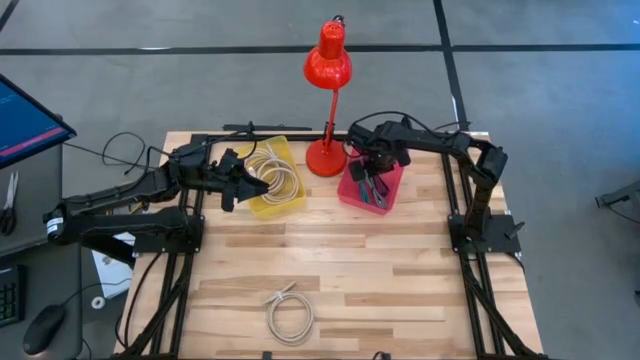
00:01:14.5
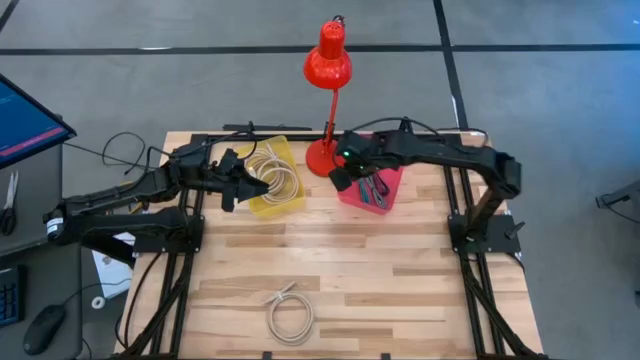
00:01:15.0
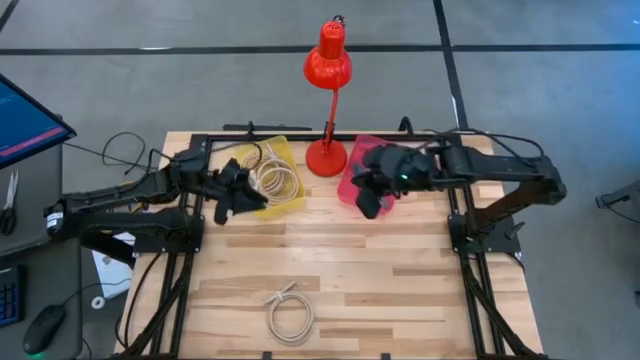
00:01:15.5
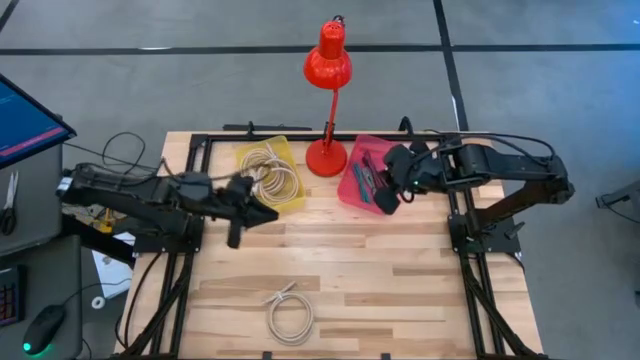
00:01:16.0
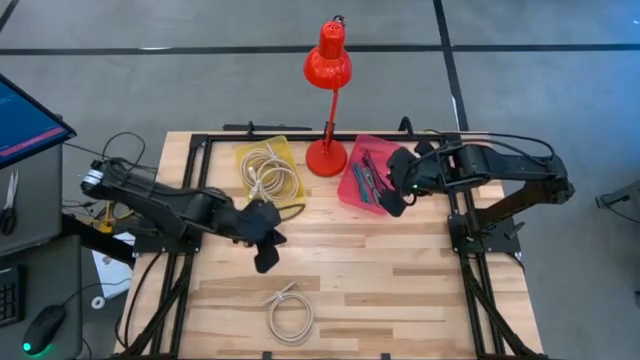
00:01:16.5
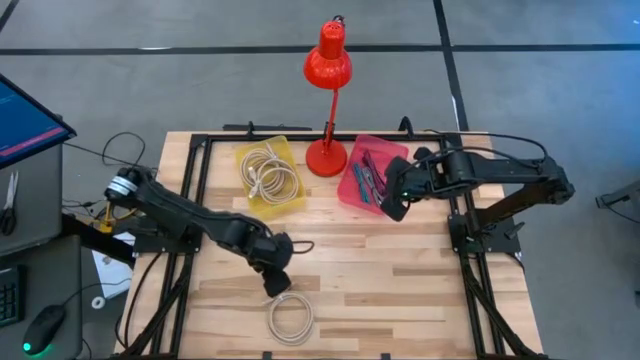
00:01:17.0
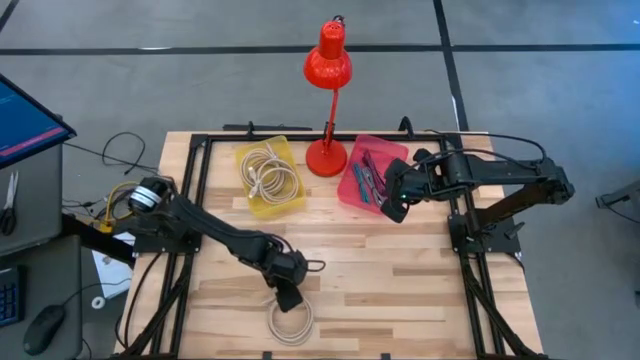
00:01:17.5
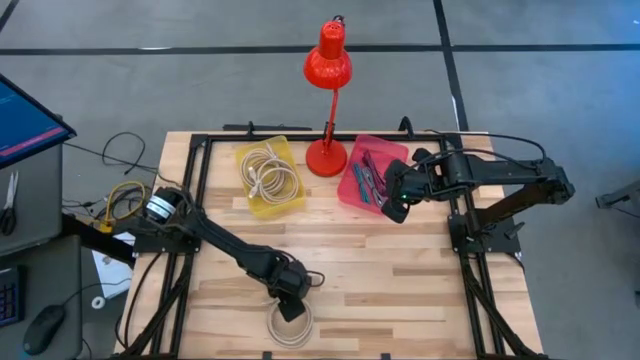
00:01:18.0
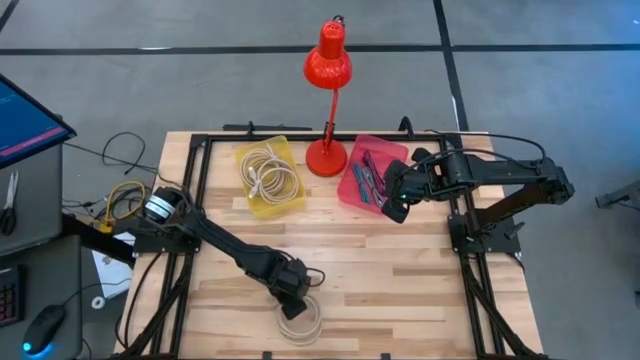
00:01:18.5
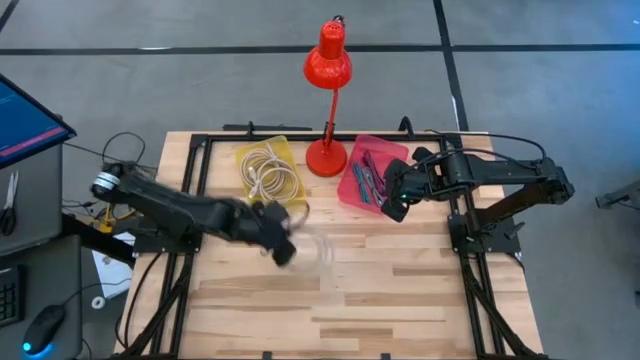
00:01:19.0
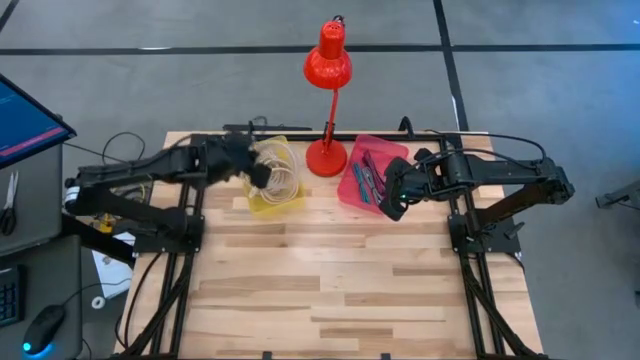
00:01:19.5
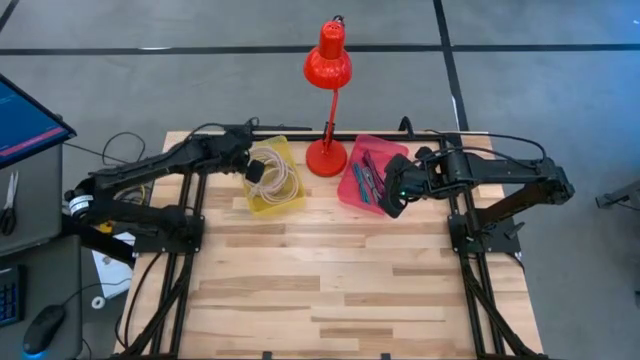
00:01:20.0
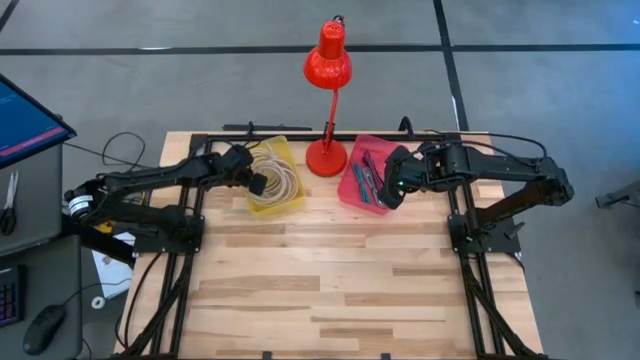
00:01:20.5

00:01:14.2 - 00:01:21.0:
Task: Pick & Place USB Port
Put the light brown USB cable into the yellow bin

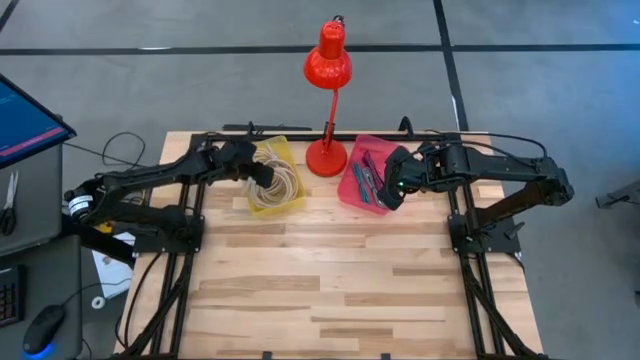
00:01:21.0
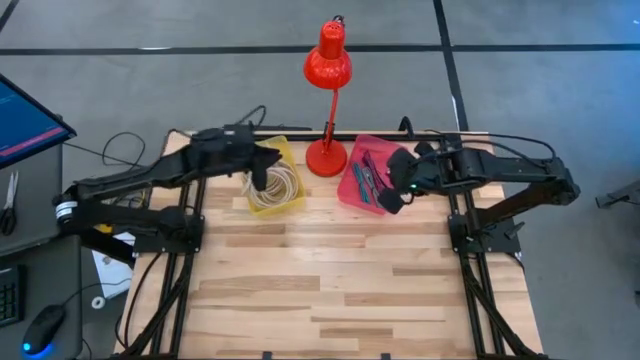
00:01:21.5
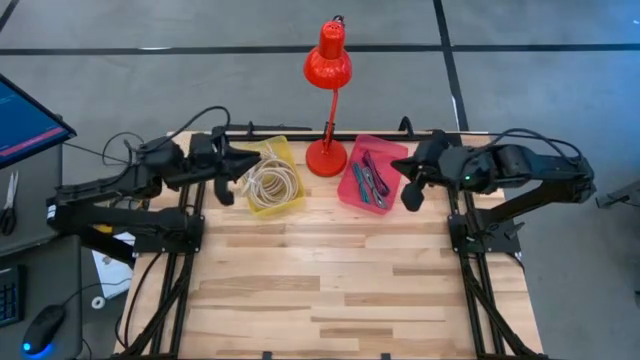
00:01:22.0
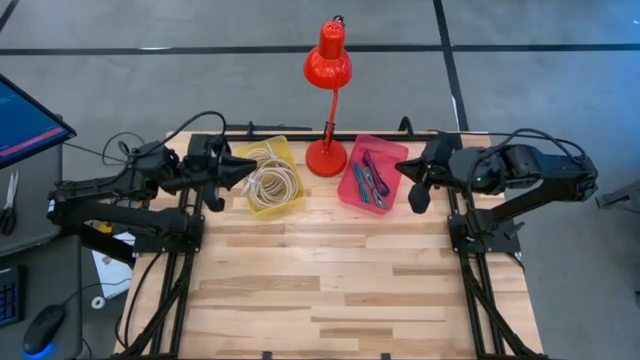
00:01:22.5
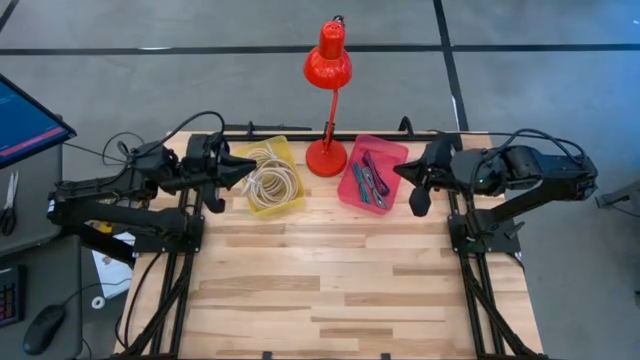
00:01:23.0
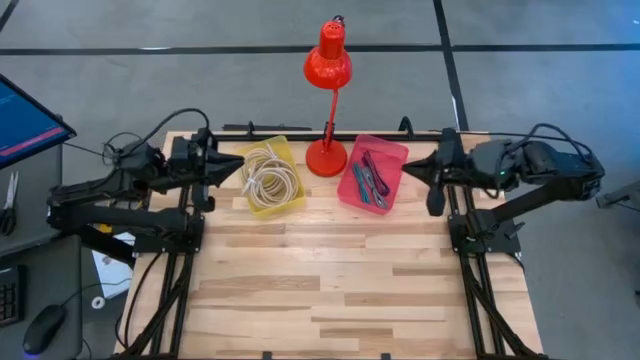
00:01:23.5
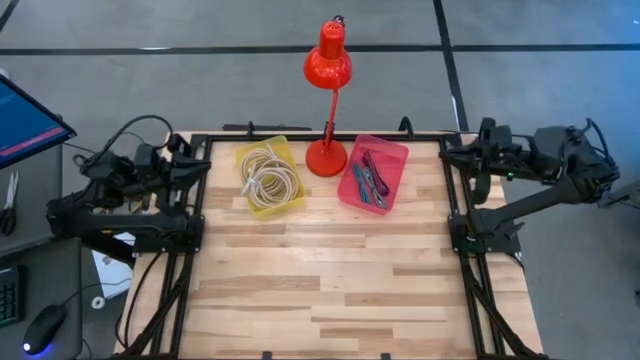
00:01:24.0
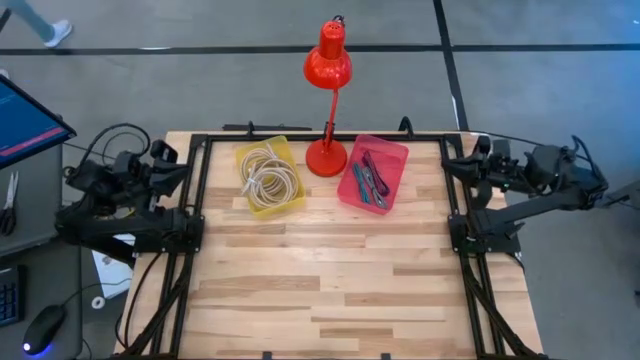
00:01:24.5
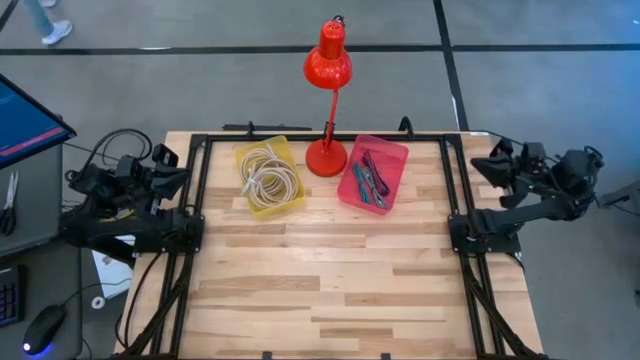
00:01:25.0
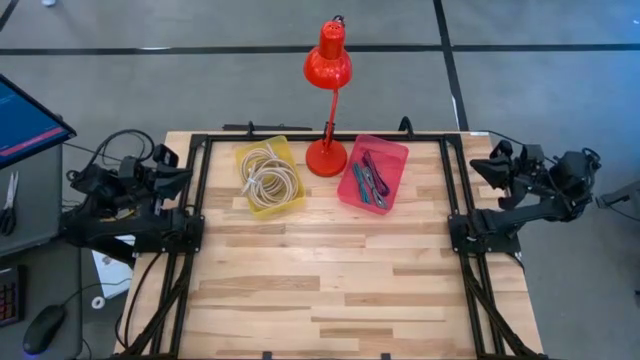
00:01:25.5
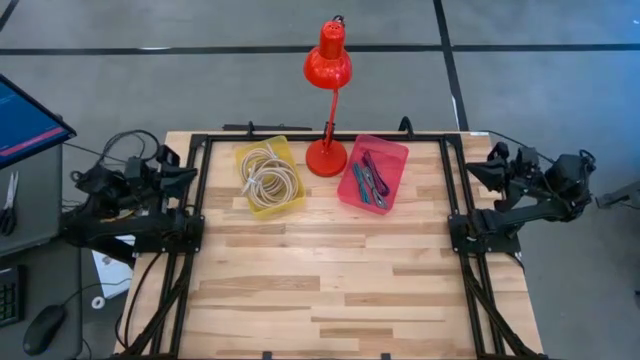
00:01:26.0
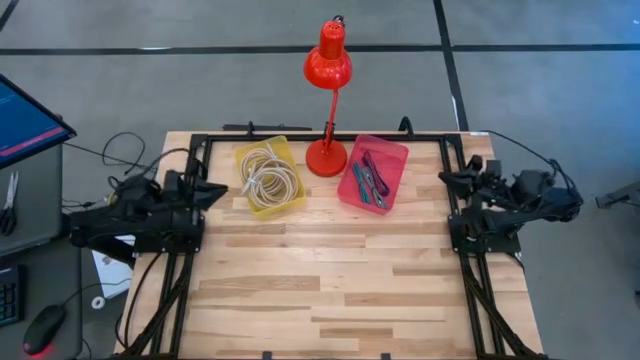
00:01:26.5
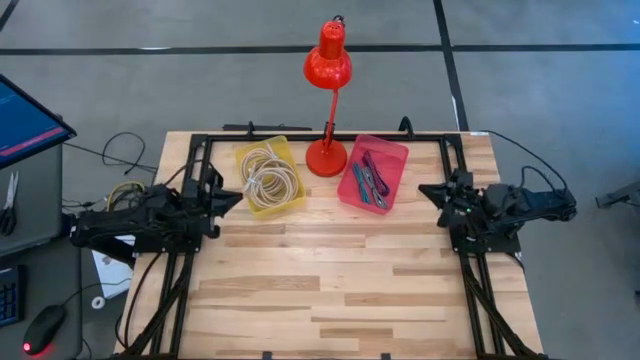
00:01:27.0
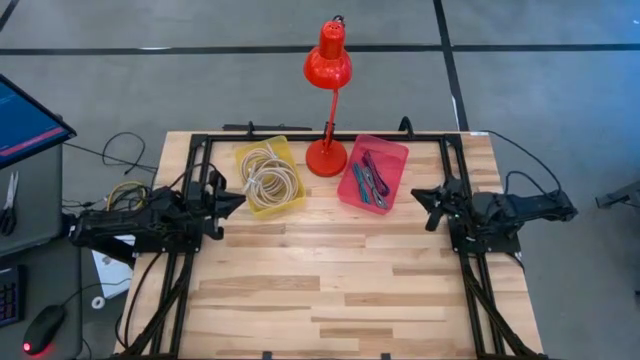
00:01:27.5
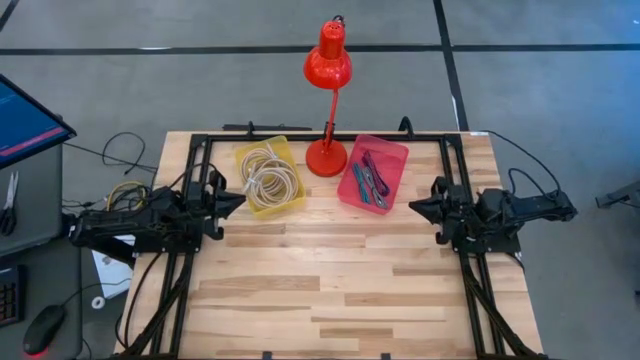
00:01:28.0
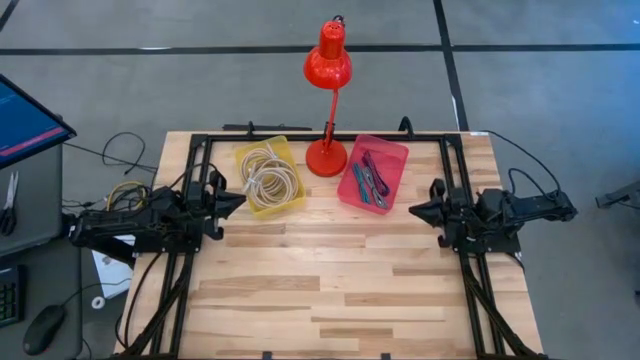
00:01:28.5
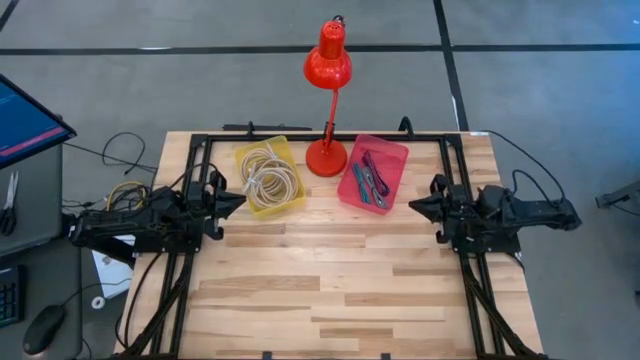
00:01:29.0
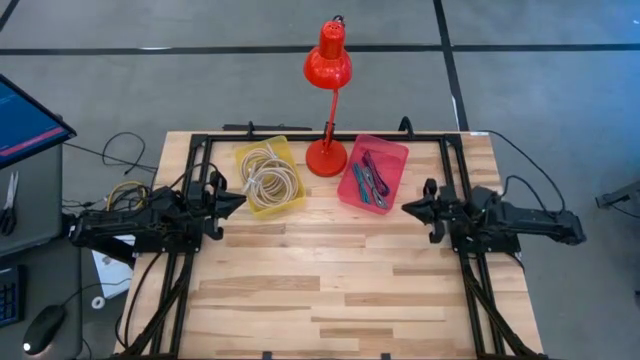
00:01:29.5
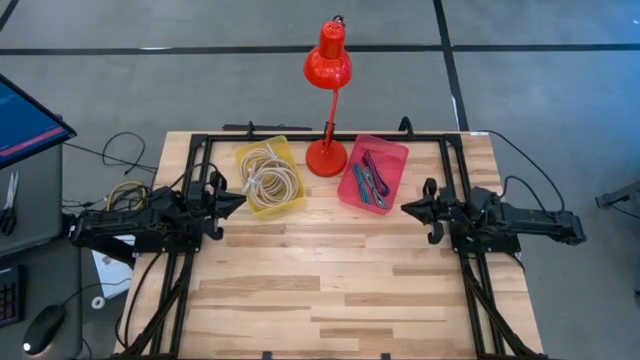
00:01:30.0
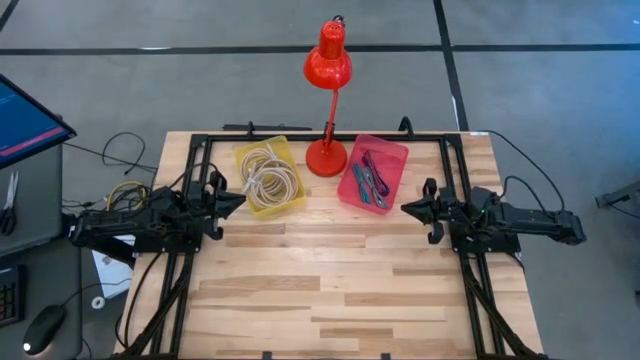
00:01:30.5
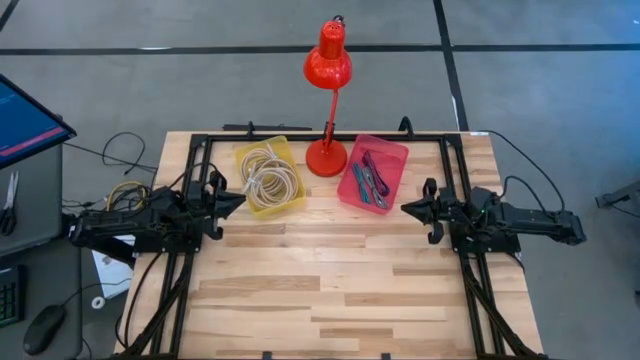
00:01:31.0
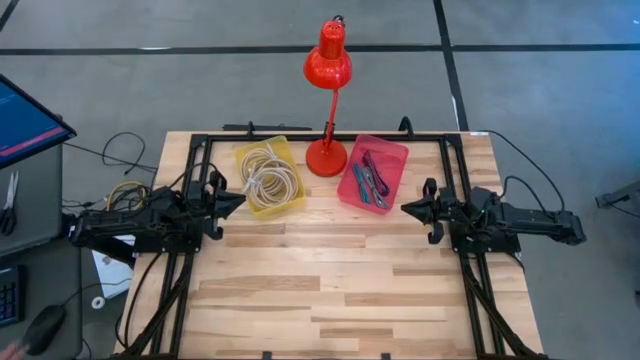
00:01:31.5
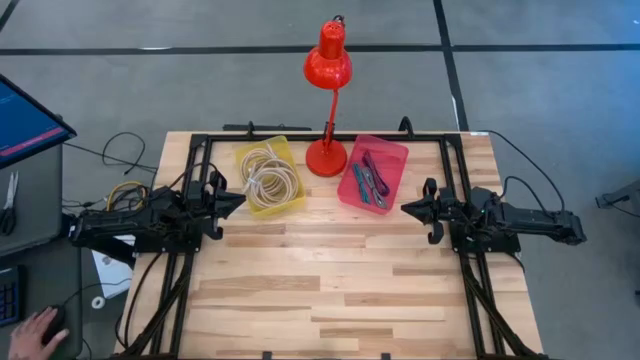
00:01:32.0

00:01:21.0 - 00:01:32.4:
Return to Home Position

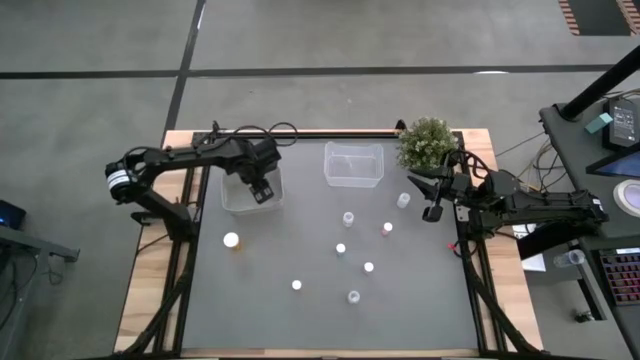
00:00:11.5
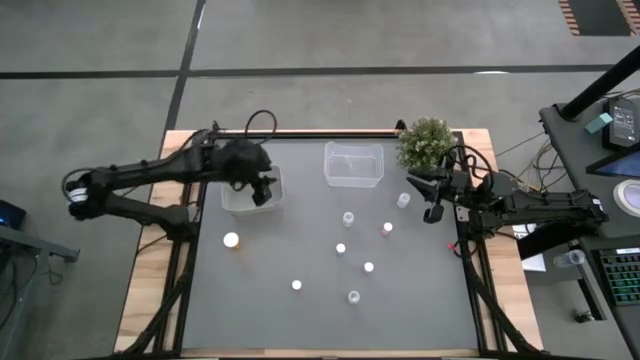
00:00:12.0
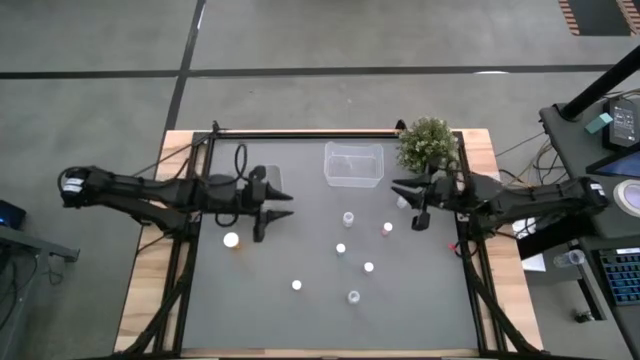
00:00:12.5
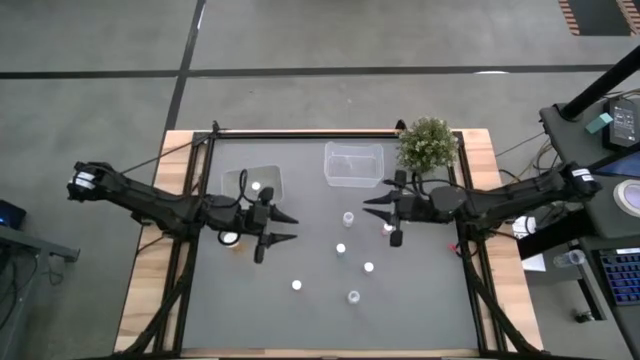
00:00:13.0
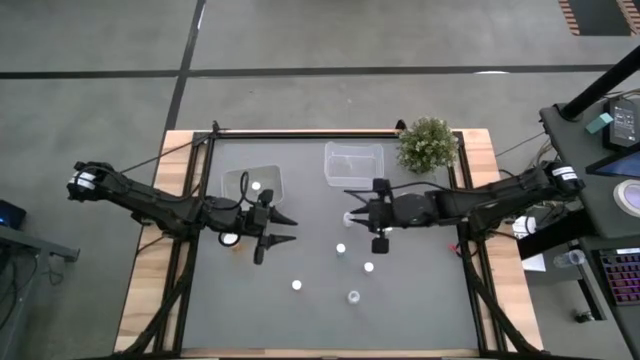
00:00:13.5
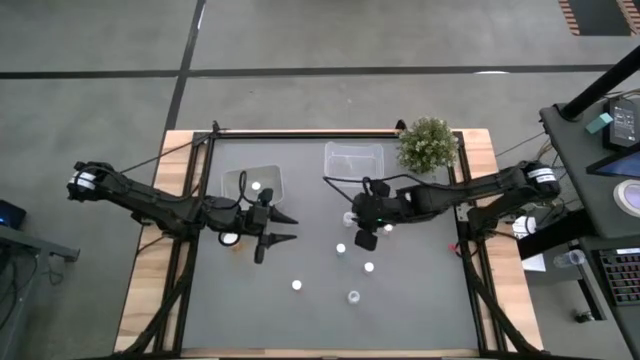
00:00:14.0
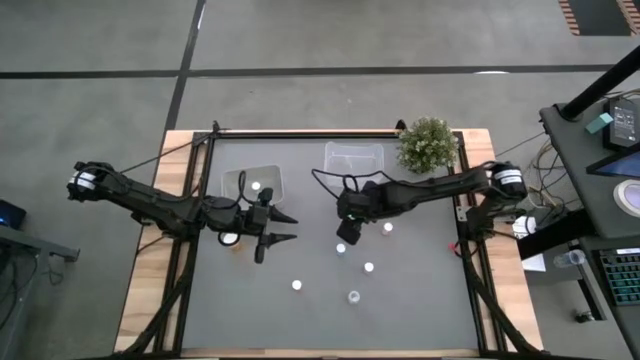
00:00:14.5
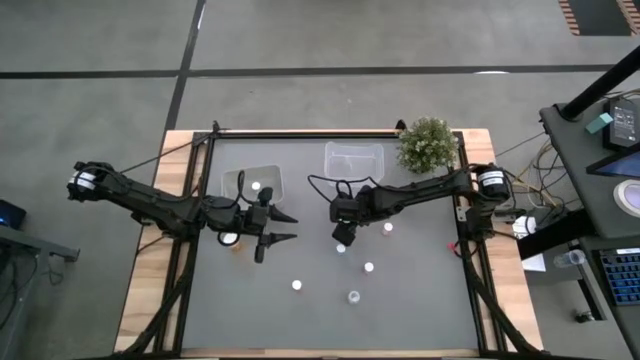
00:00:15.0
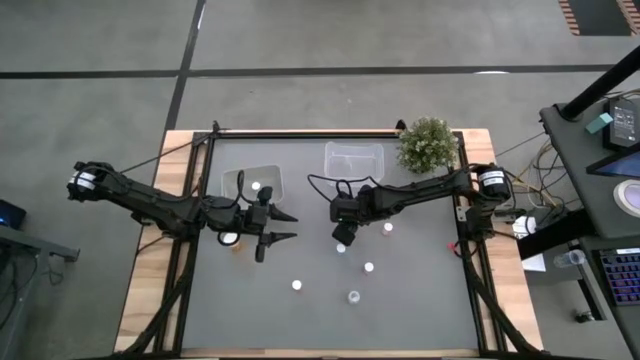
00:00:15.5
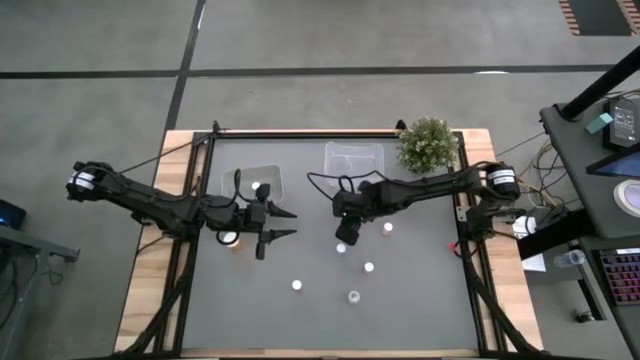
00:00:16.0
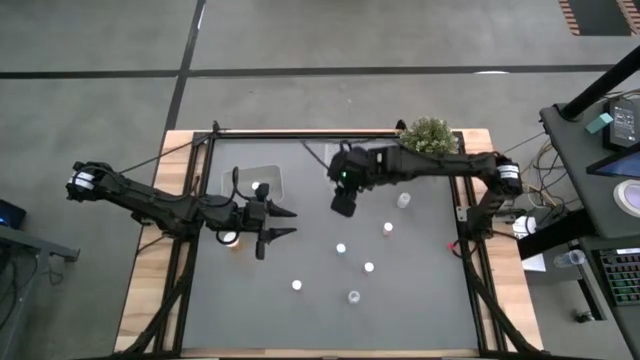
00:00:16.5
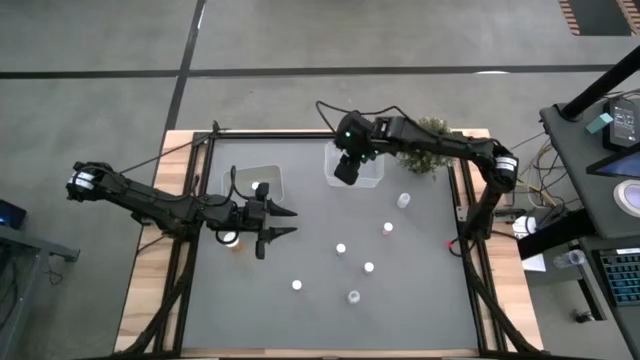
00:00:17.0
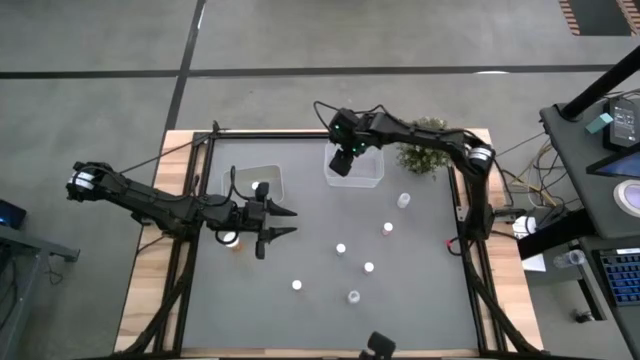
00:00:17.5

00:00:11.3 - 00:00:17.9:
Task: Pick and place medicine bottles into bin by pill shape (circle, oval)
Put the middle big transparent pill bottle into the transparent bin
